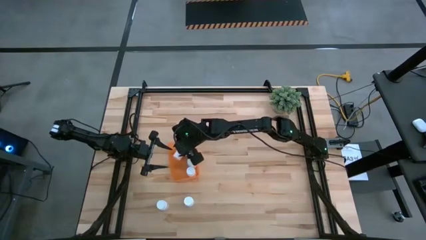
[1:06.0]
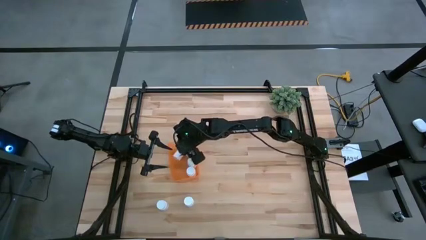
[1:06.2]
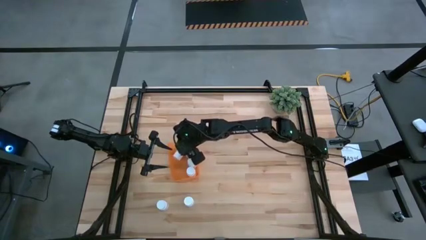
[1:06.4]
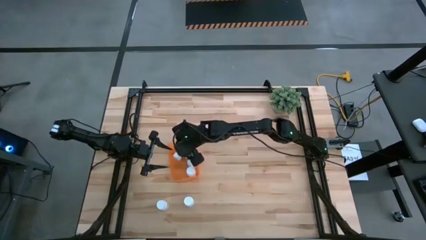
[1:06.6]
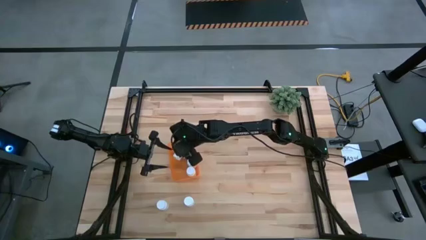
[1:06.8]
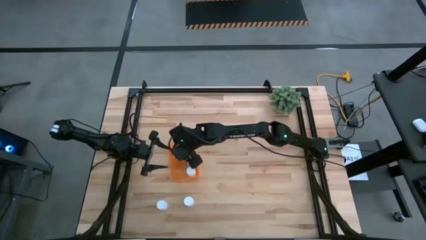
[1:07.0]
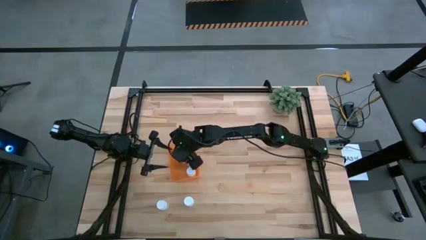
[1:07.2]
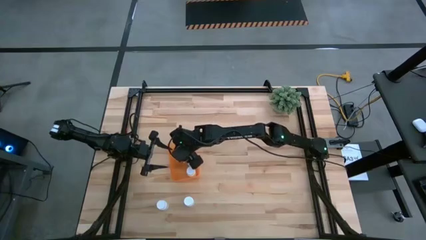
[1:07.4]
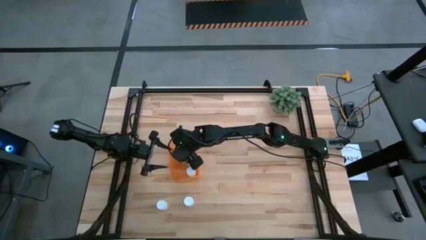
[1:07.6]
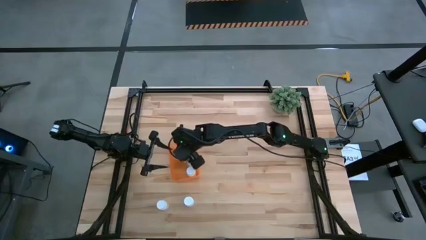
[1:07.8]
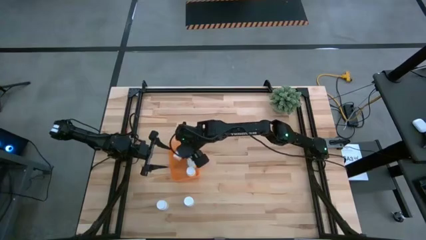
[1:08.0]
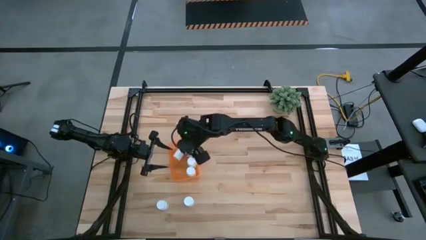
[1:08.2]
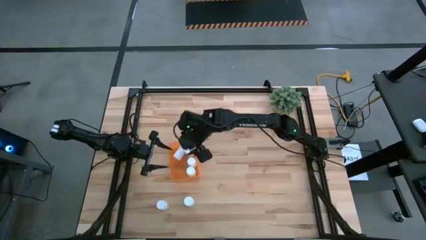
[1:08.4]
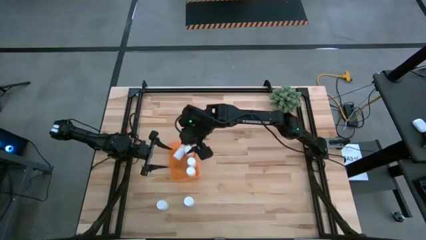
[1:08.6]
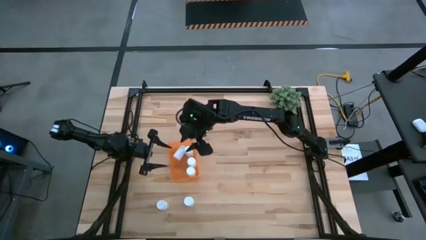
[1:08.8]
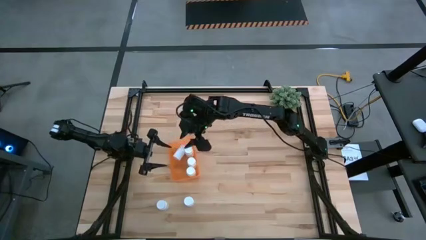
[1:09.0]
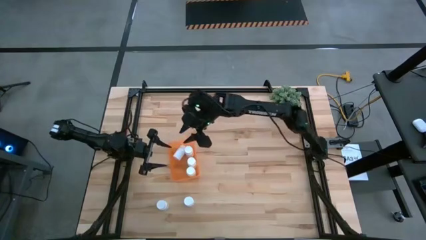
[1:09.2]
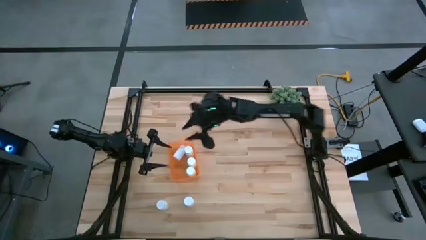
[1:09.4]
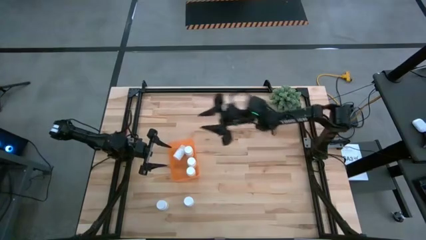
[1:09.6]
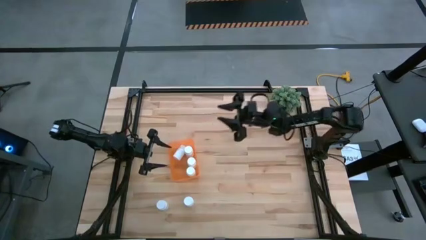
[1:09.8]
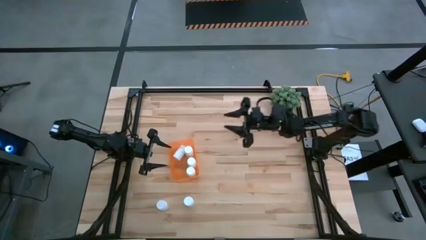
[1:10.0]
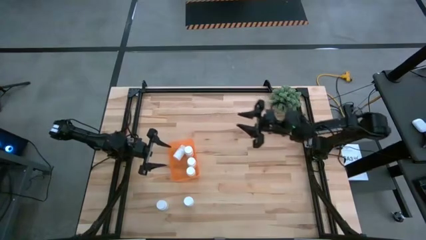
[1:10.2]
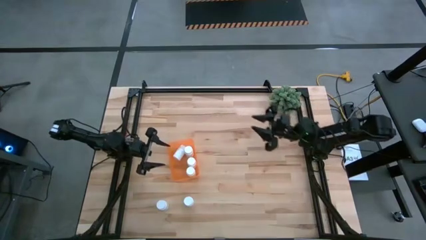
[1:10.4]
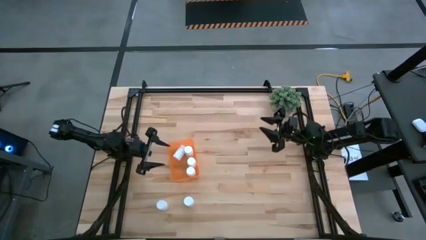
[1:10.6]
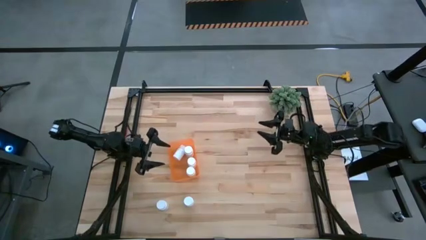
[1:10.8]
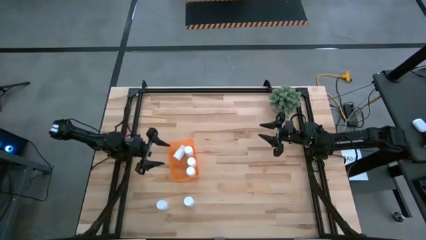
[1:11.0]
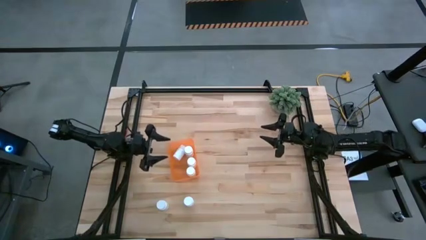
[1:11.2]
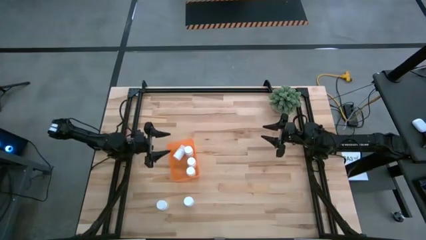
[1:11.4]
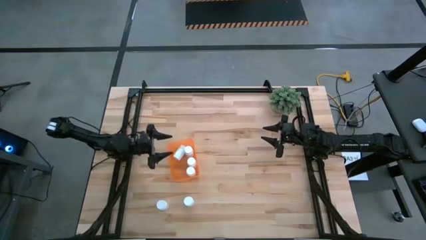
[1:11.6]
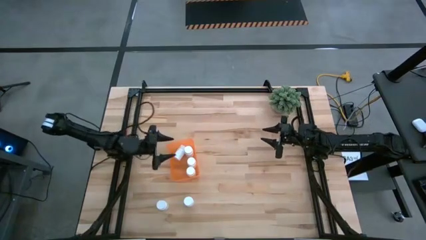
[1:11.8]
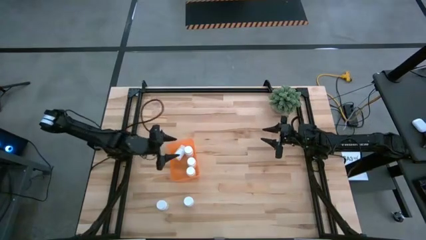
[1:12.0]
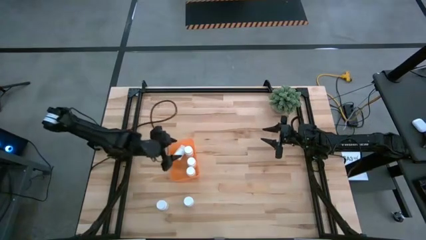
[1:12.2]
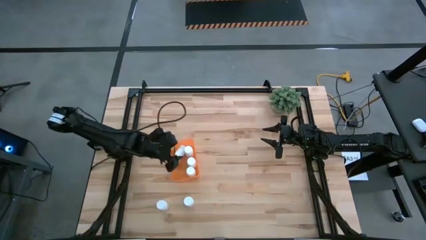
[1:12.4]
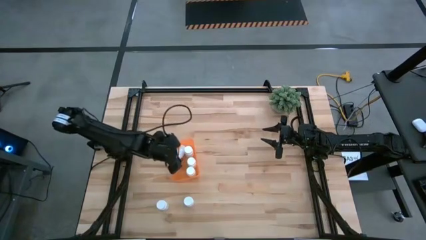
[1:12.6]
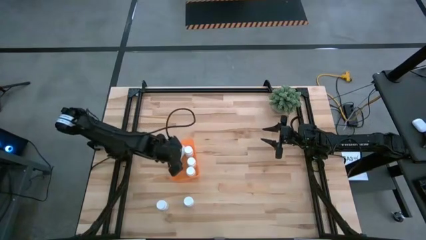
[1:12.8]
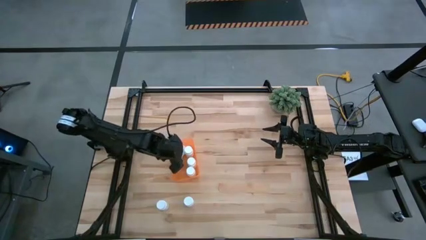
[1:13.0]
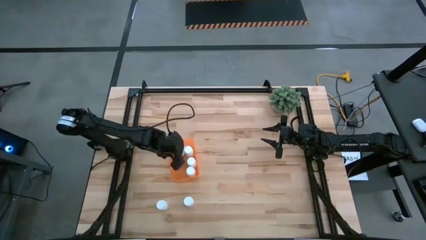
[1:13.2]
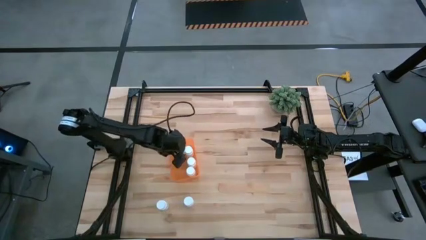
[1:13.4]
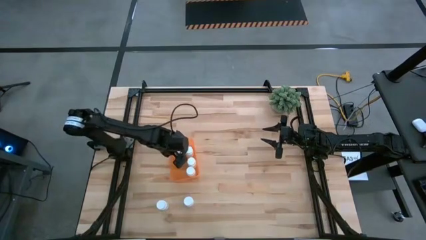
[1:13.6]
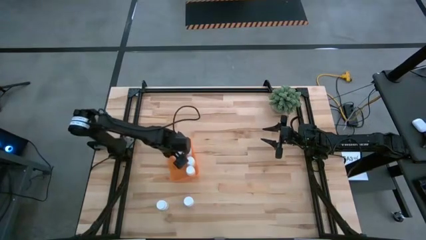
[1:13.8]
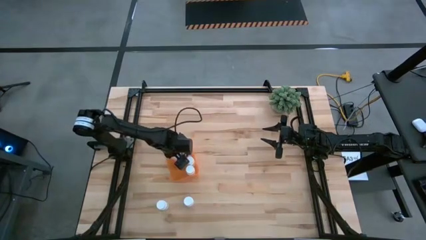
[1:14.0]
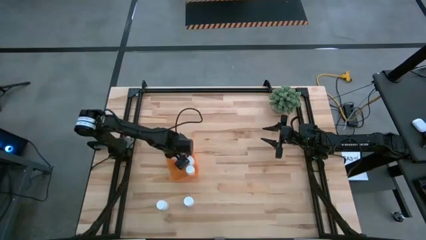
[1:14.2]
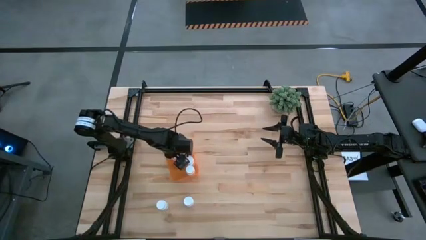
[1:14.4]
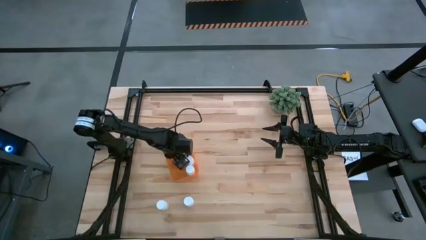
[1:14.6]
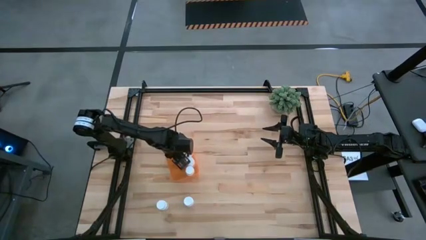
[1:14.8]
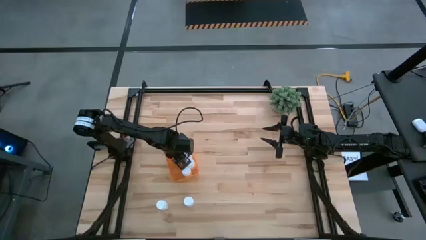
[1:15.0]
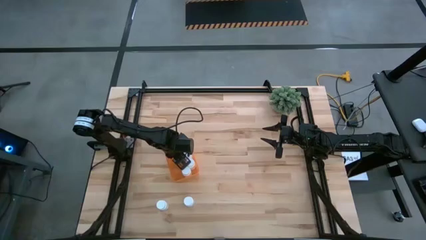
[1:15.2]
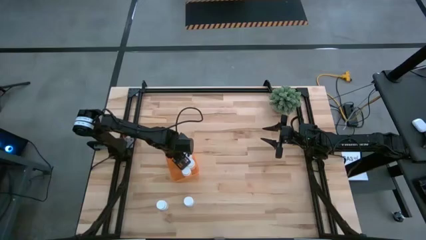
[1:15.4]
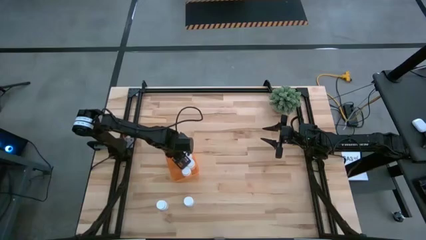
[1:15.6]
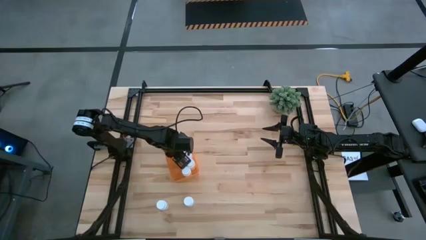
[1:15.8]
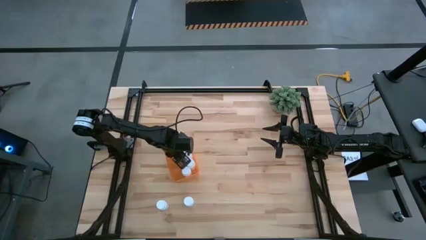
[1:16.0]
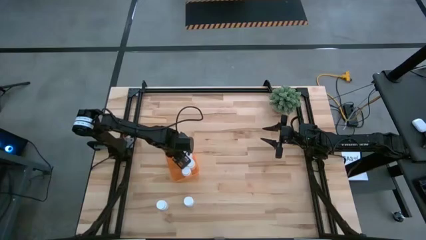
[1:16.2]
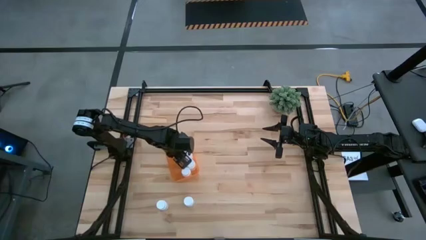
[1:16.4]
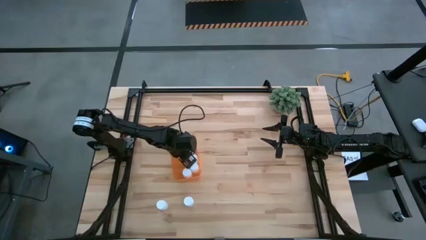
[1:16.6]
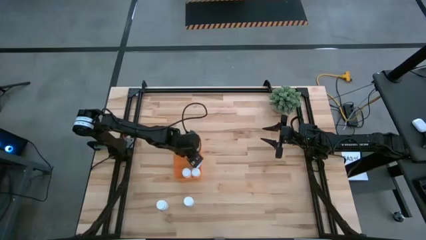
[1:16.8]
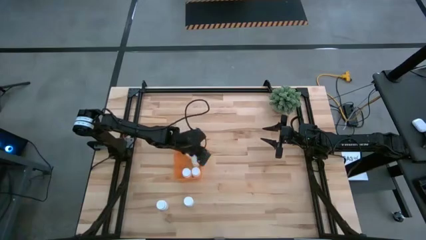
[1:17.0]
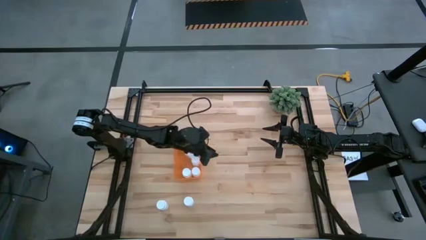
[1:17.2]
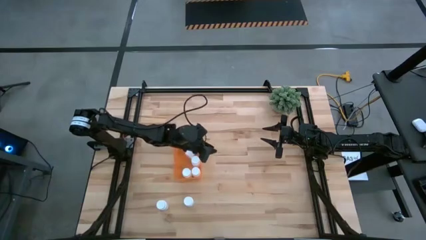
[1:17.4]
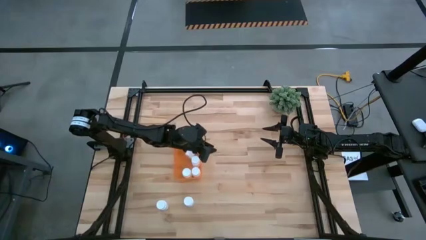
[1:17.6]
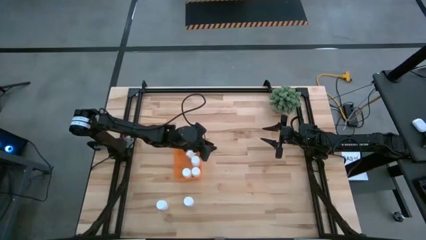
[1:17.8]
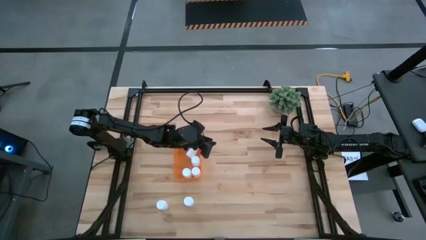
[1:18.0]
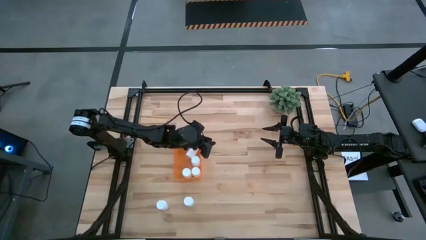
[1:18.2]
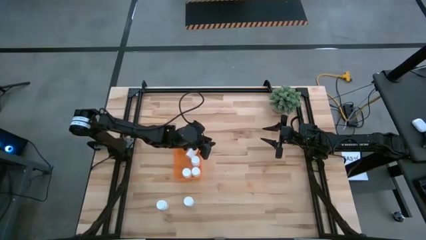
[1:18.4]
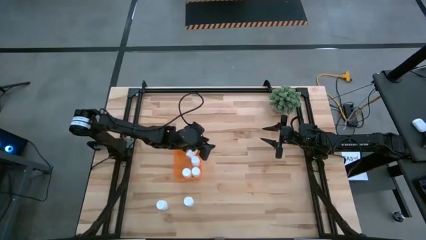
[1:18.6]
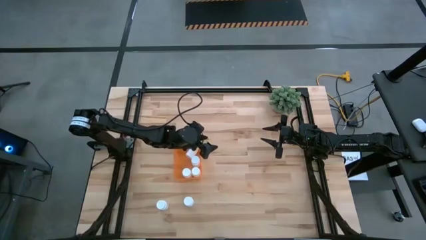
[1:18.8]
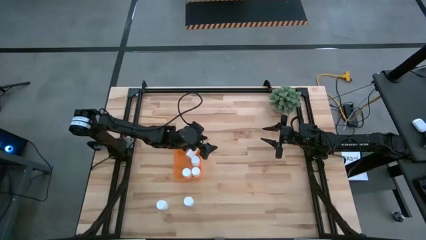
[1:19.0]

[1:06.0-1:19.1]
Task: Pick and place pill bottles into a basket
Put the top right white medicine bottle into the orange bin
